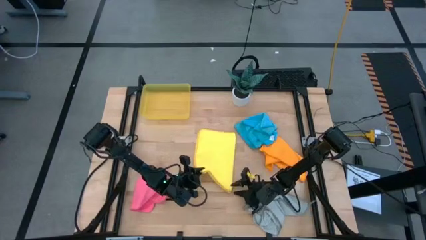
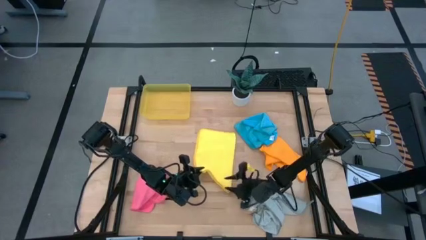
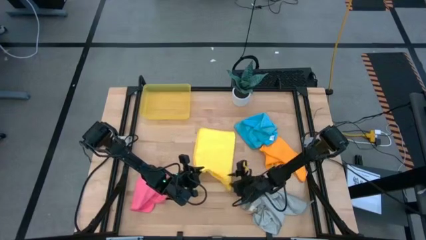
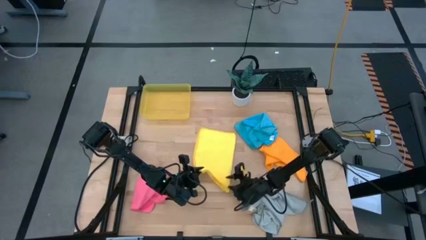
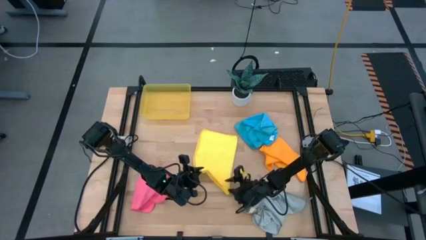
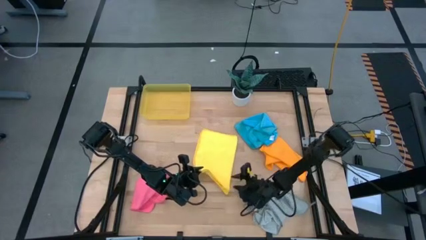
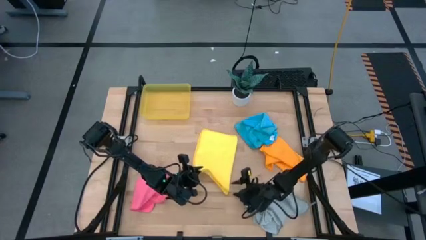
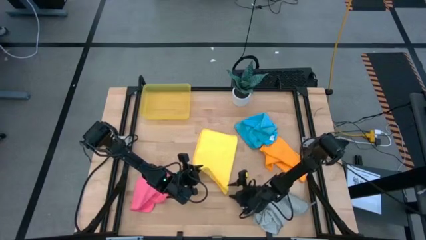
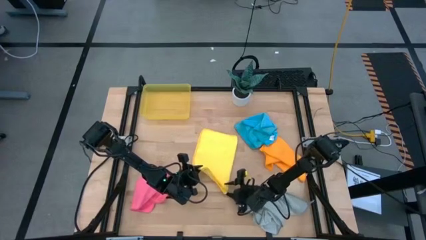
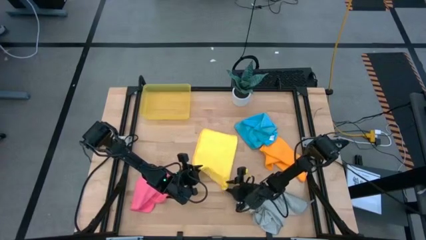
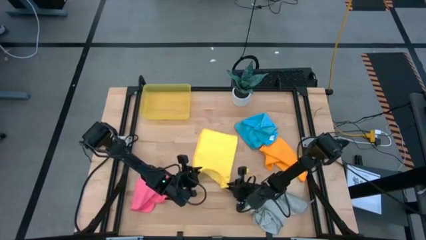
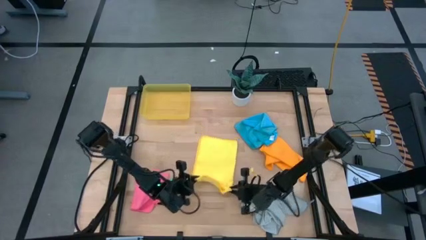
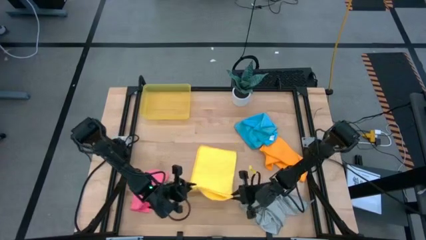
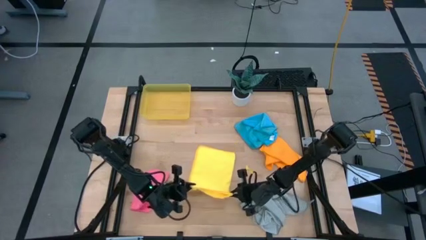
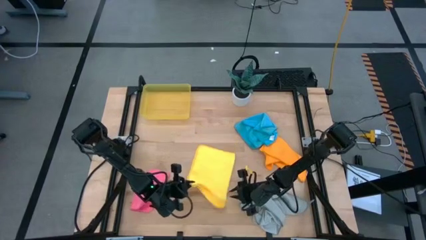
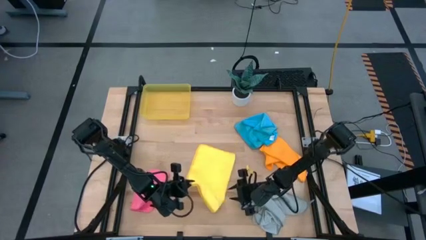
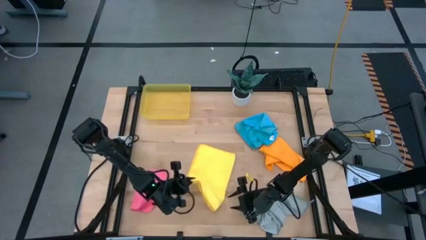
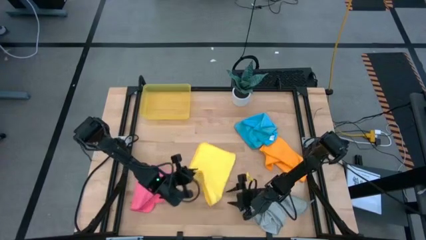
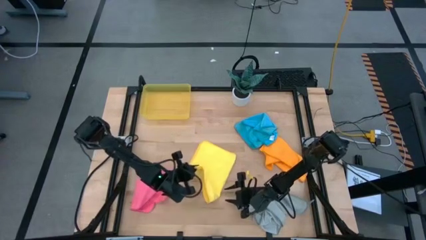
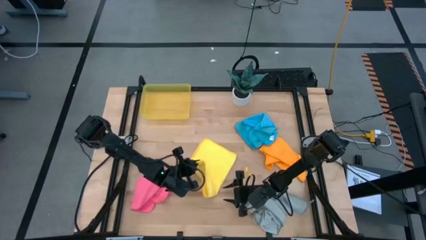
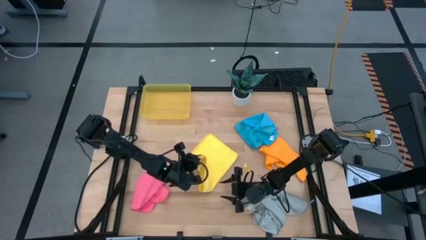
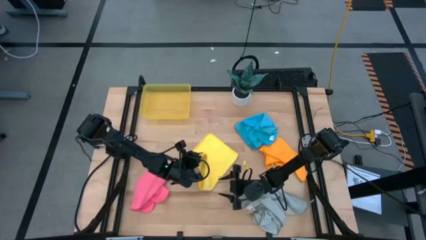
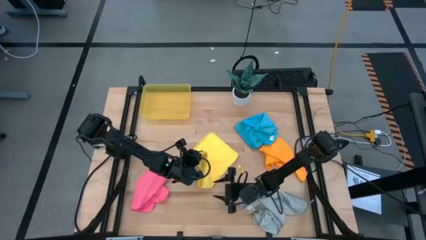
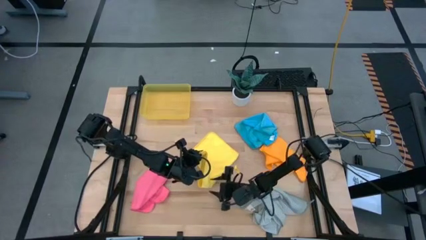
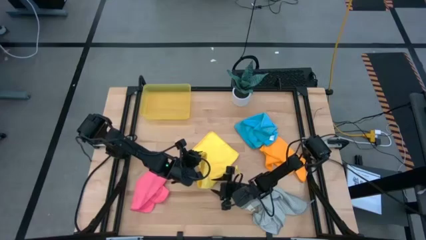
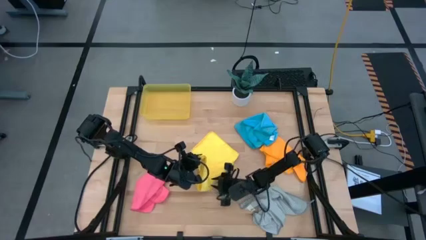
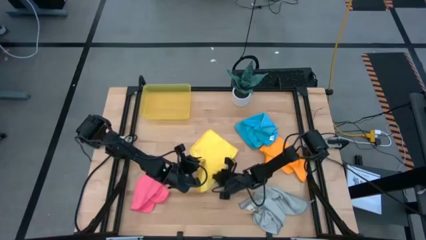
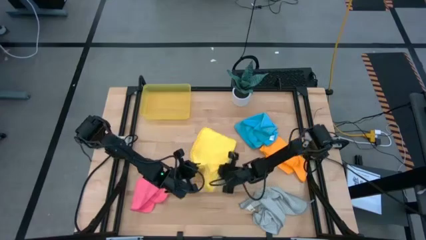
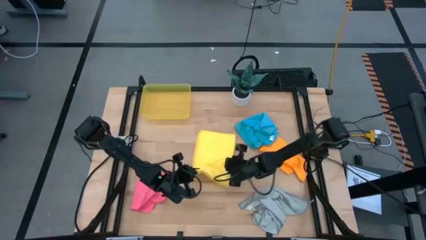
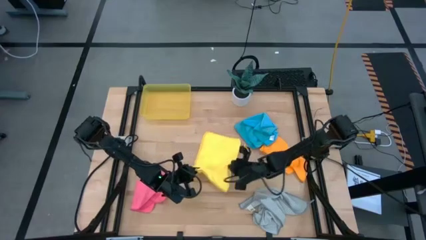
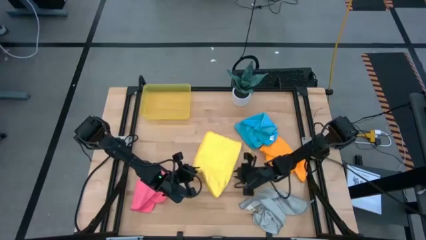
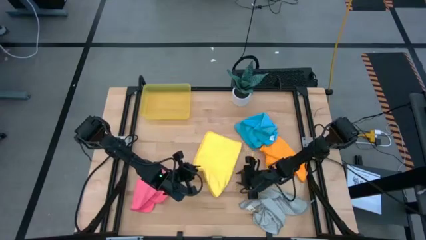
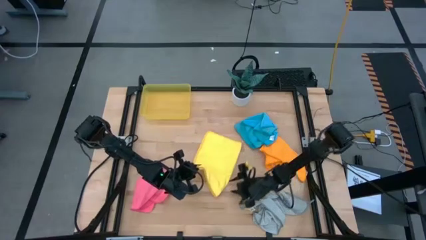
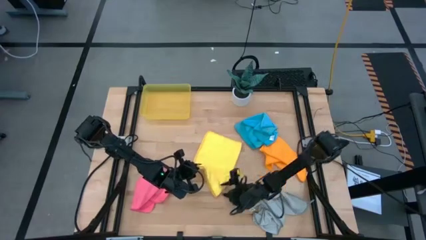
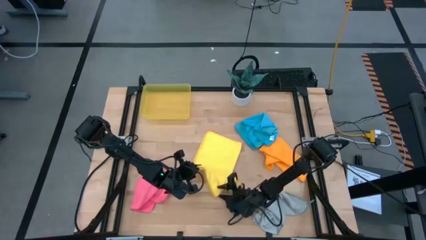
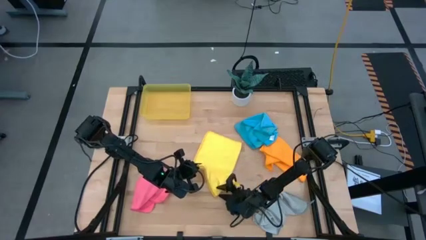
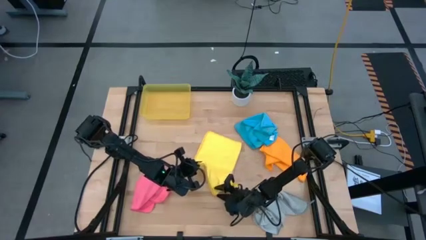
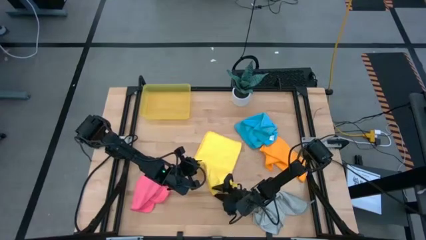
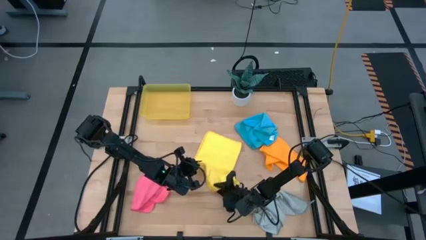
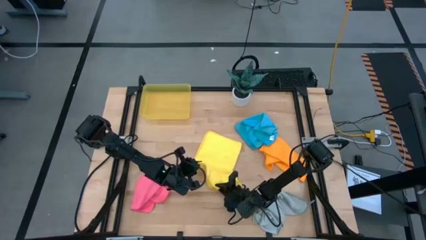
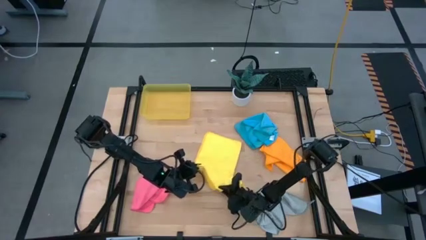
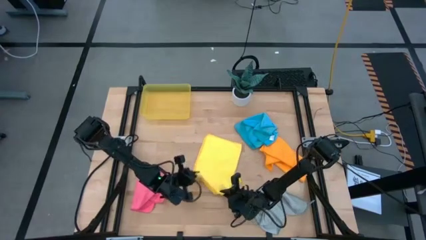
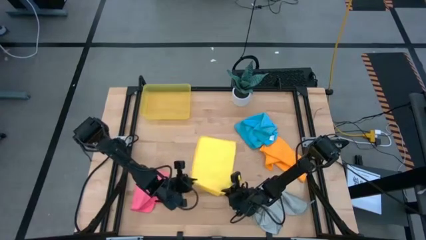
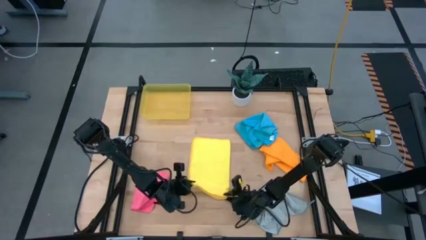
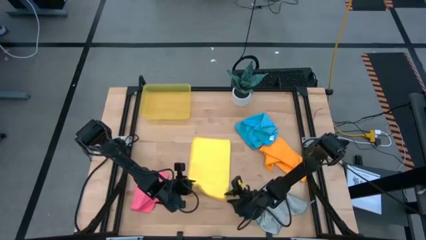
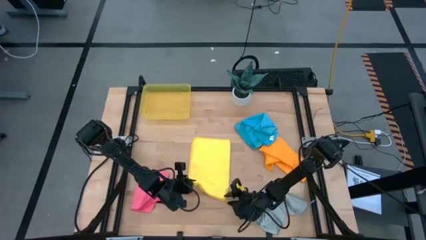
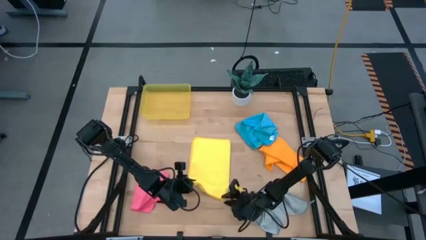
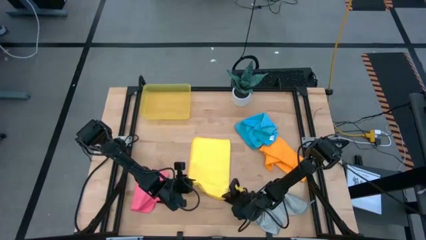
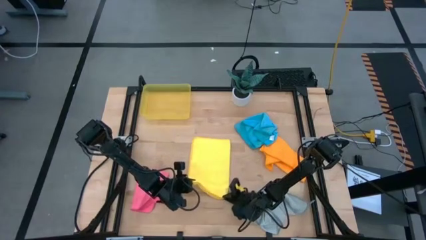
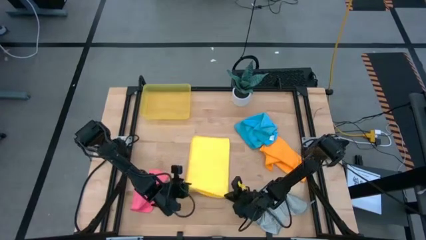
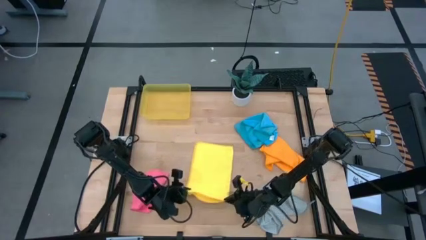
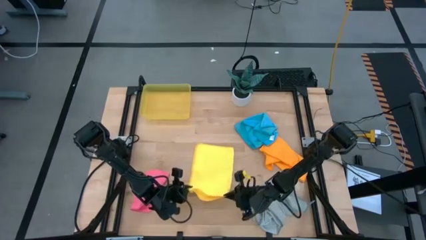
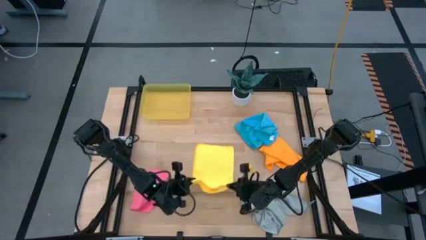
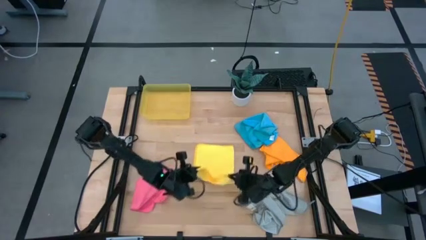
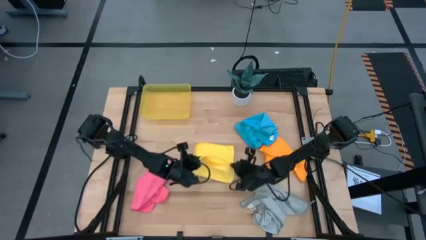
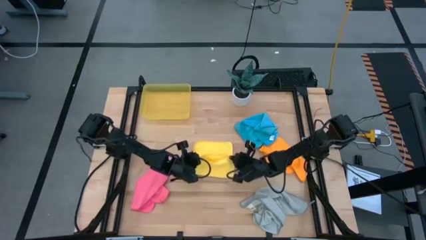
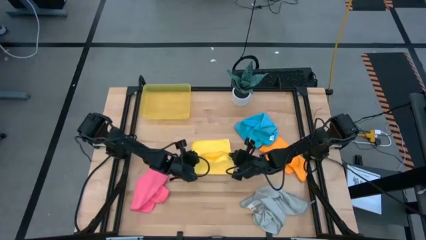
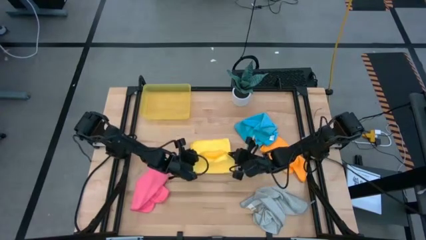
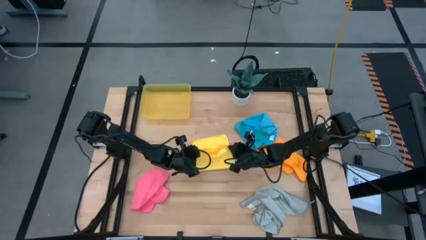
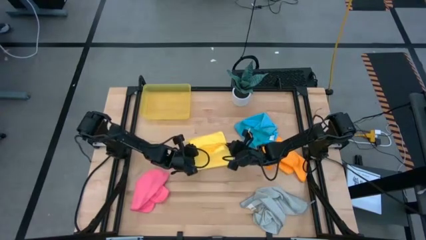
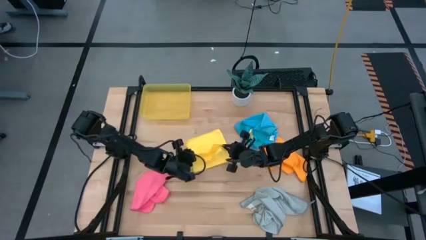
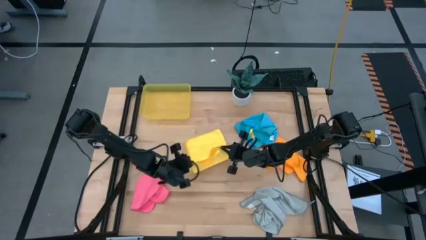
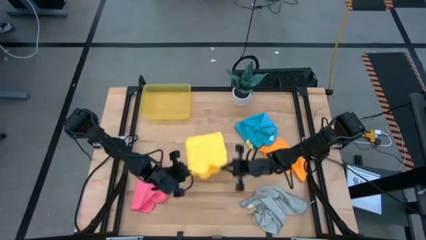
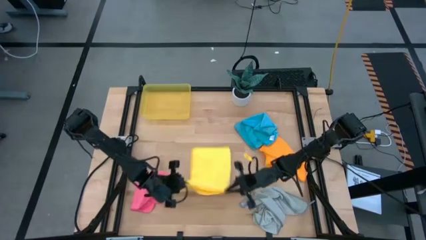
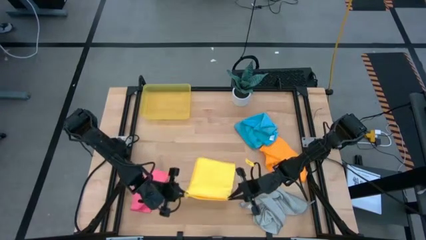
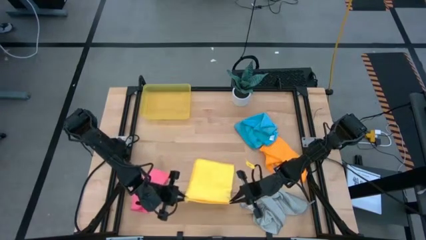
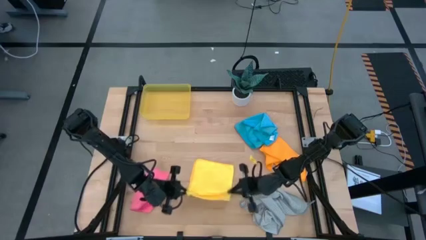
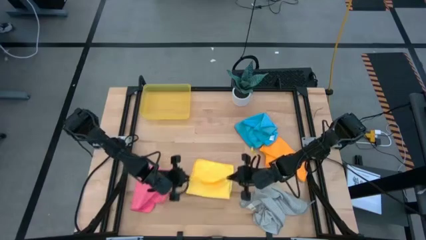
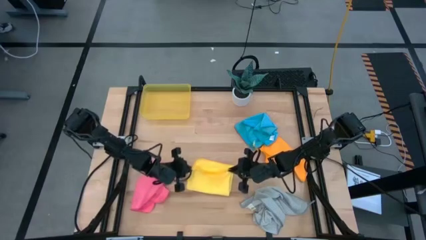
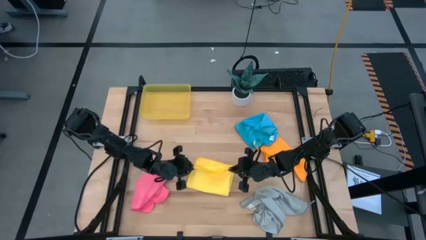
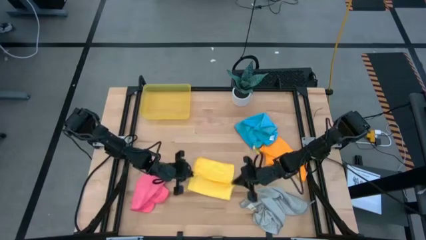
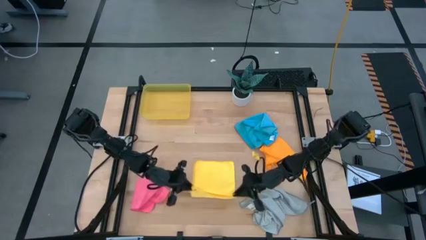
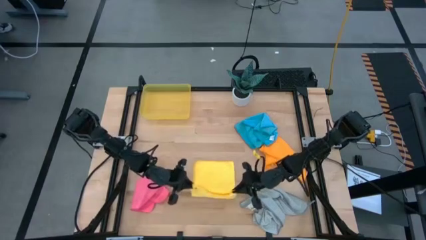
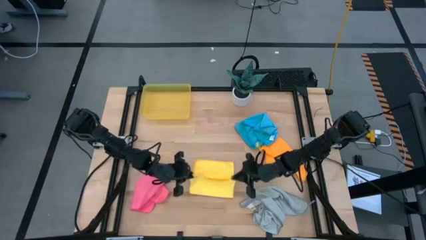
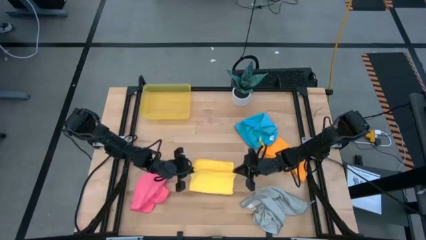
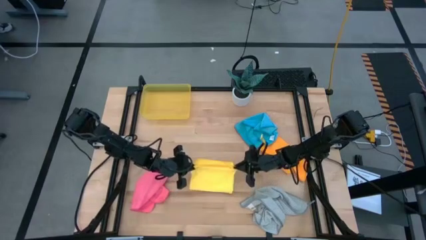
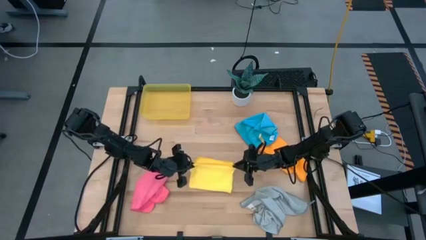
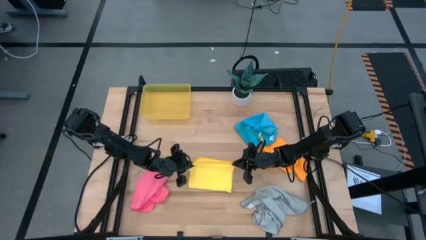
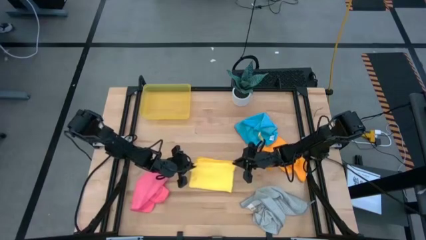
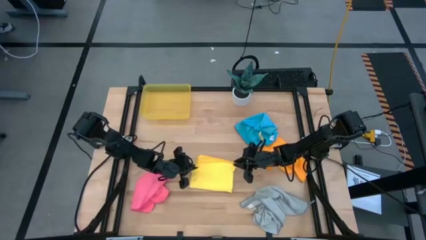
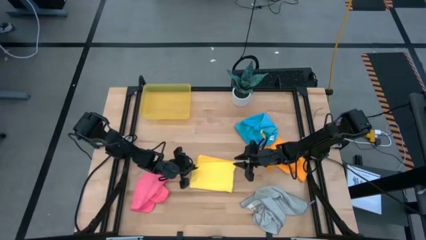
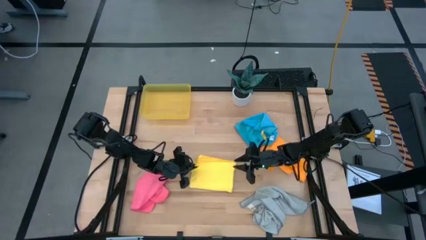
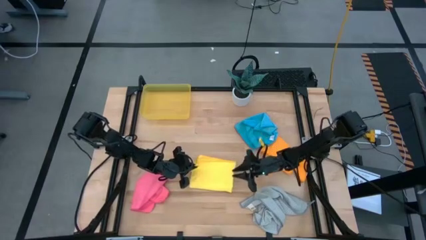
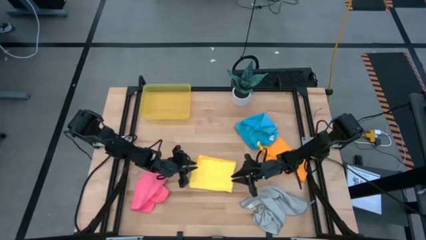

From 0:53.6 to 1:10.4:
Task: Fold microfiber towels
Fold the yellow microfiber cloth

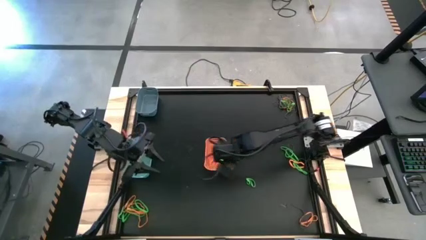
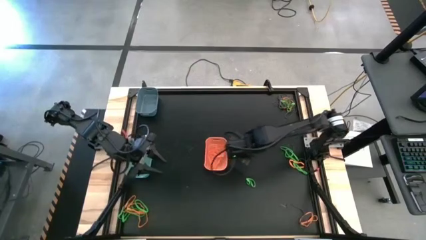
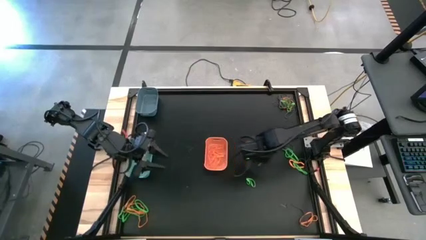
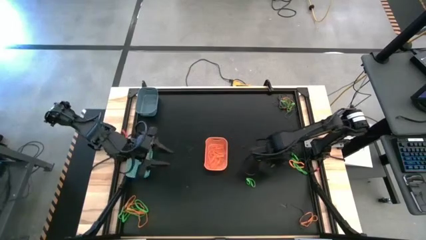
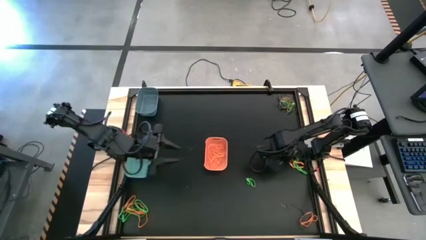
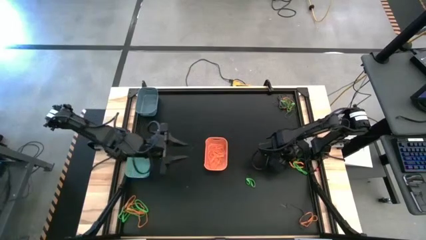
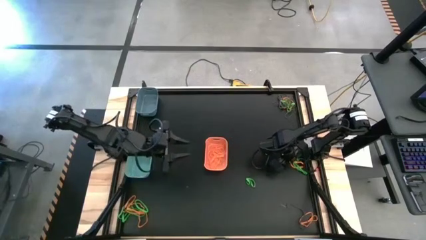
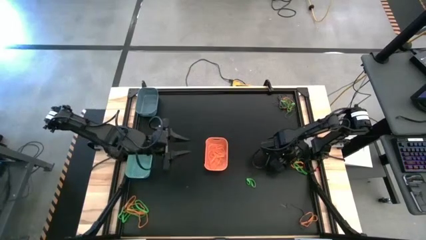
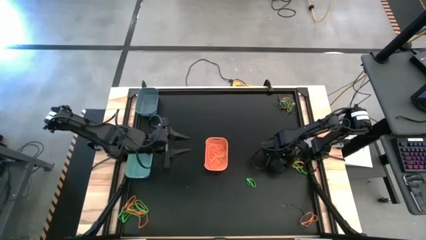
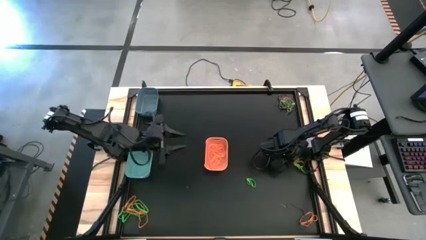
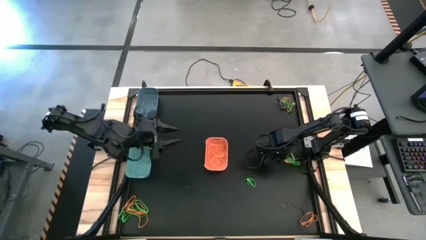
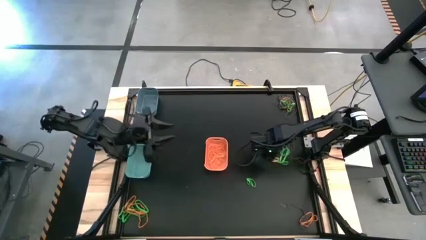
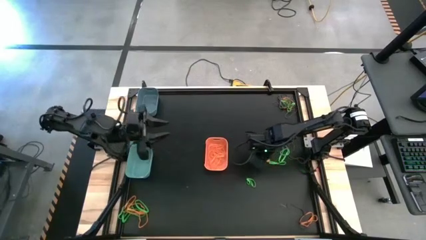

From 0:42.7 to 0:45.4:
Task: Sort rubber bands into baskets
Put the orange rubber band into the orange bin
